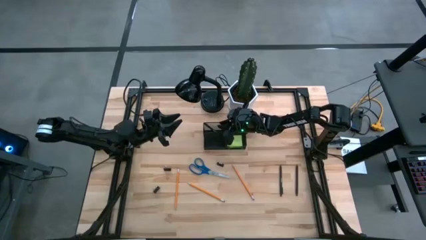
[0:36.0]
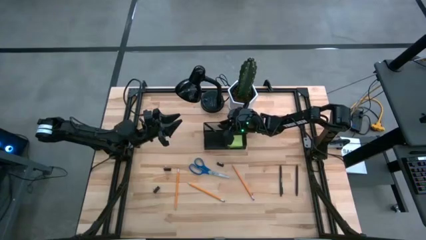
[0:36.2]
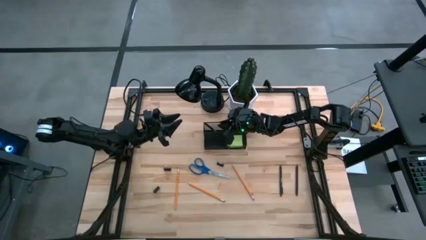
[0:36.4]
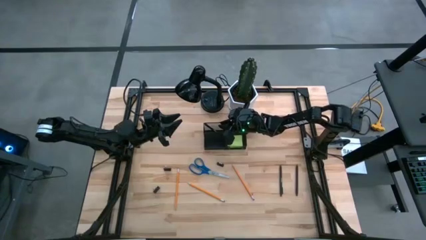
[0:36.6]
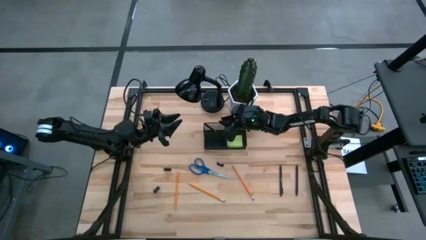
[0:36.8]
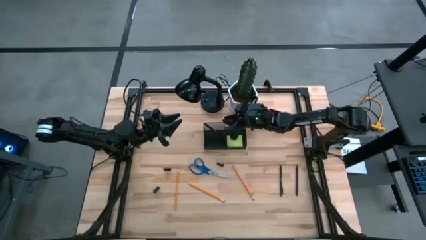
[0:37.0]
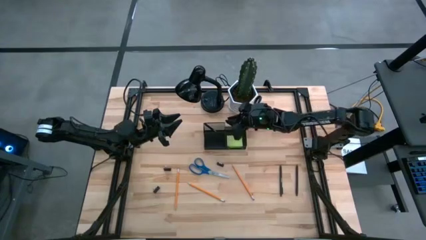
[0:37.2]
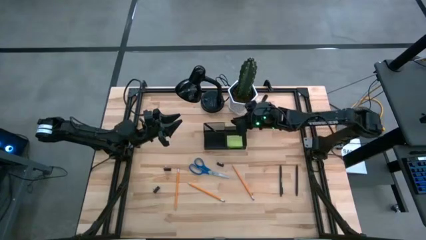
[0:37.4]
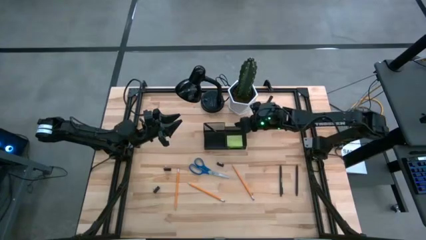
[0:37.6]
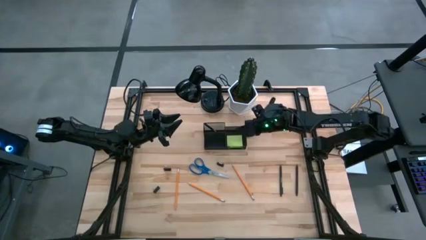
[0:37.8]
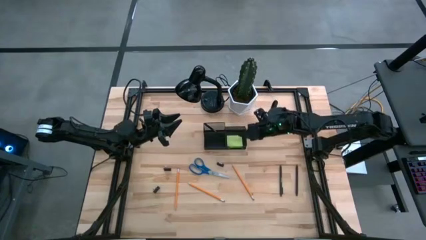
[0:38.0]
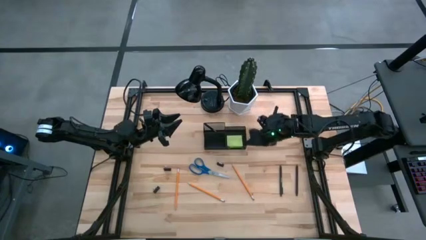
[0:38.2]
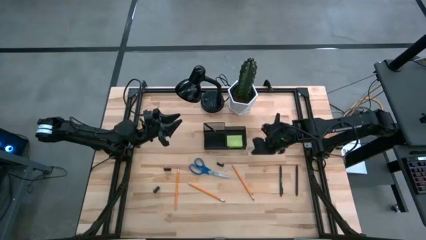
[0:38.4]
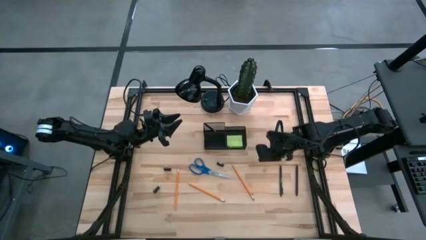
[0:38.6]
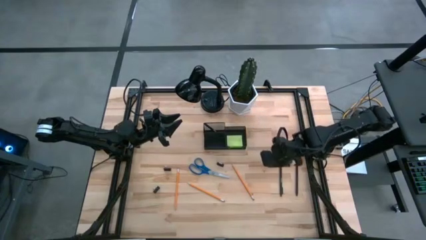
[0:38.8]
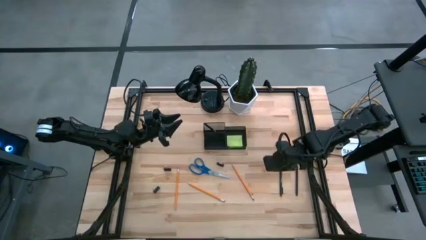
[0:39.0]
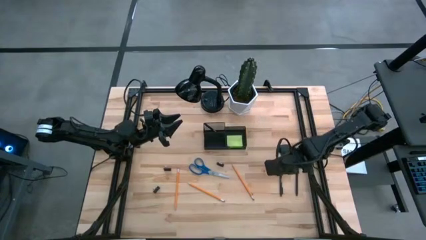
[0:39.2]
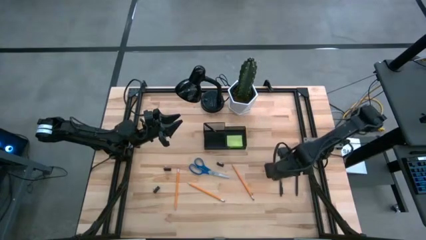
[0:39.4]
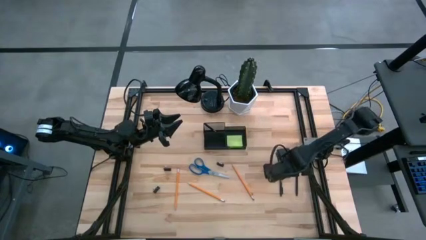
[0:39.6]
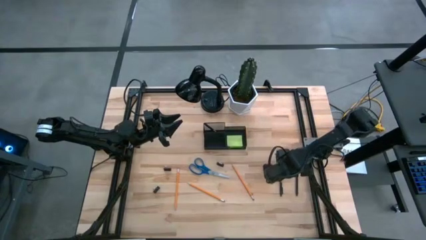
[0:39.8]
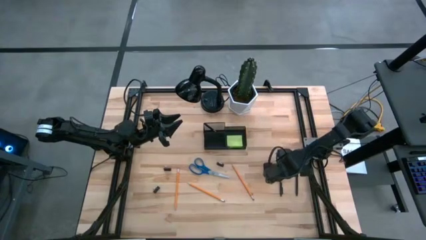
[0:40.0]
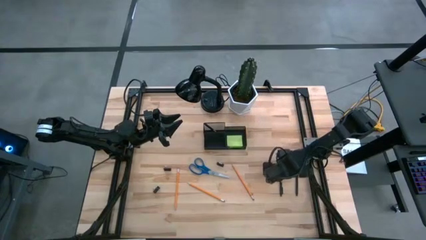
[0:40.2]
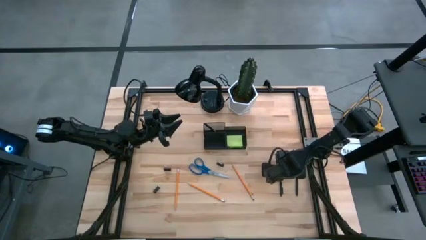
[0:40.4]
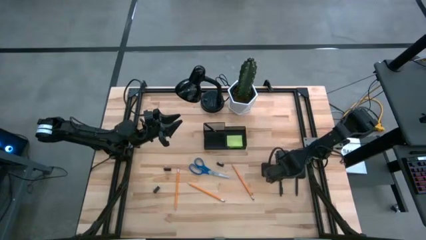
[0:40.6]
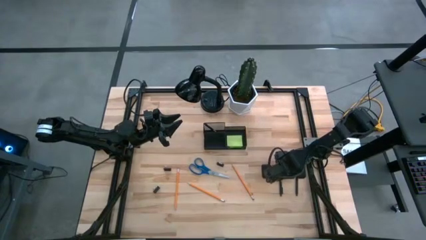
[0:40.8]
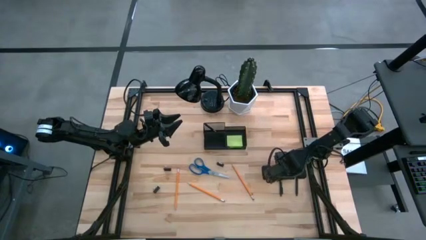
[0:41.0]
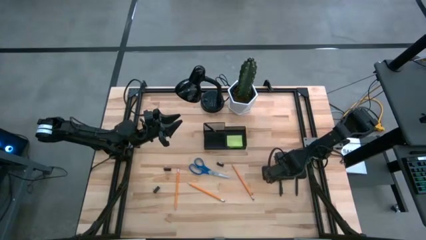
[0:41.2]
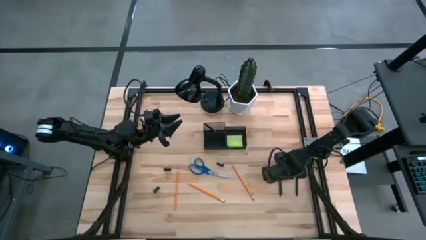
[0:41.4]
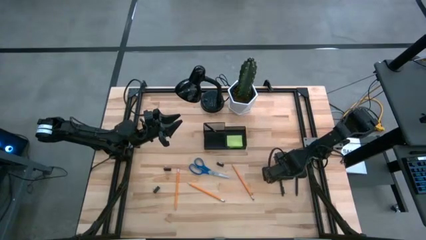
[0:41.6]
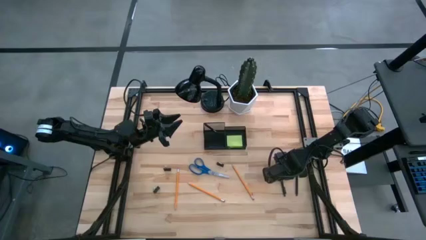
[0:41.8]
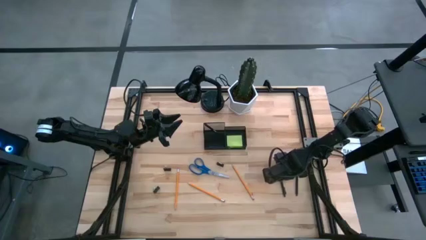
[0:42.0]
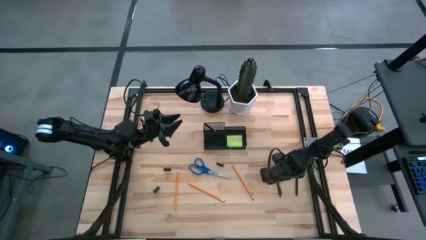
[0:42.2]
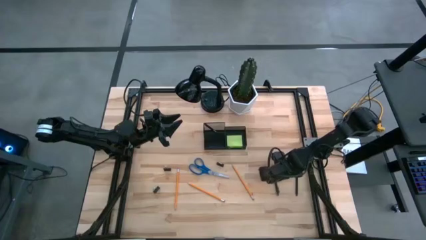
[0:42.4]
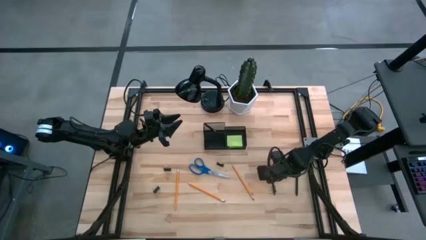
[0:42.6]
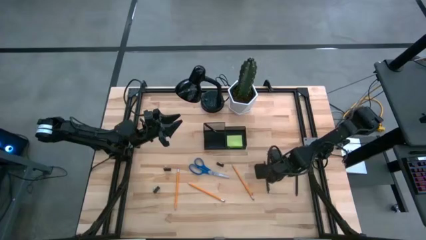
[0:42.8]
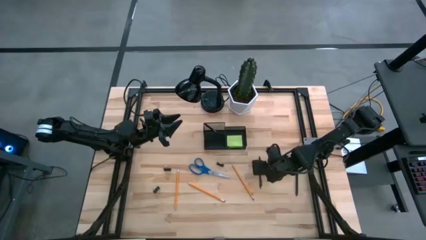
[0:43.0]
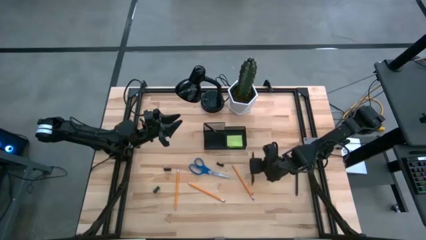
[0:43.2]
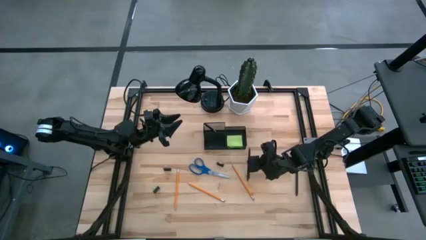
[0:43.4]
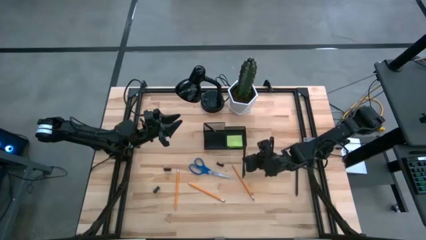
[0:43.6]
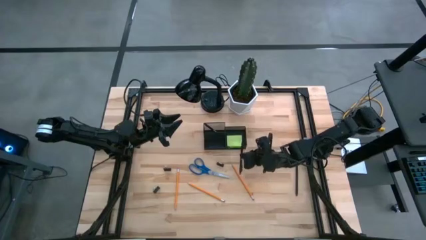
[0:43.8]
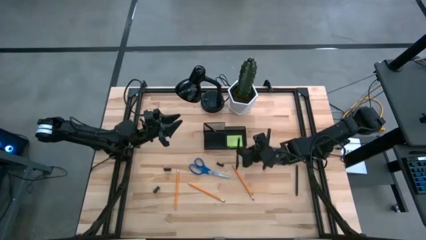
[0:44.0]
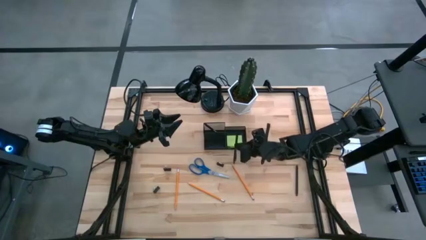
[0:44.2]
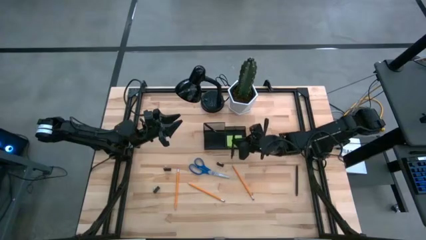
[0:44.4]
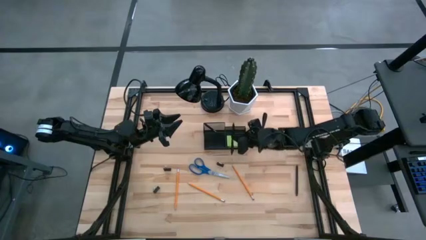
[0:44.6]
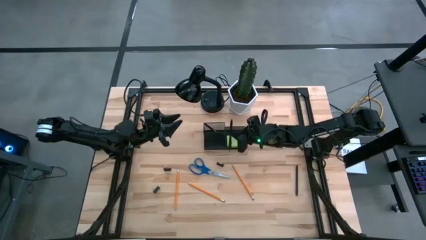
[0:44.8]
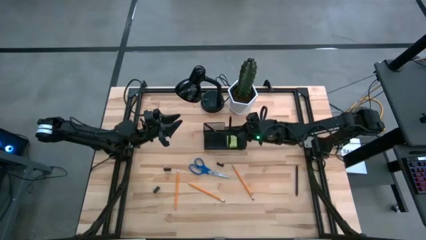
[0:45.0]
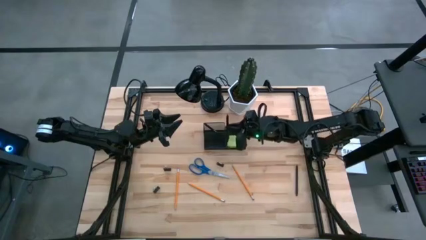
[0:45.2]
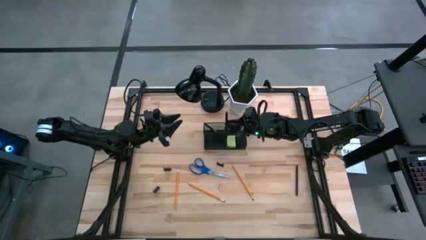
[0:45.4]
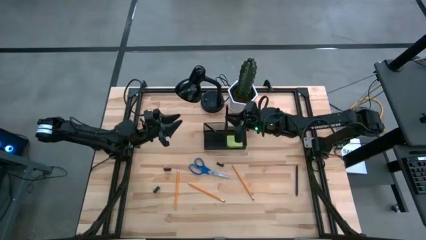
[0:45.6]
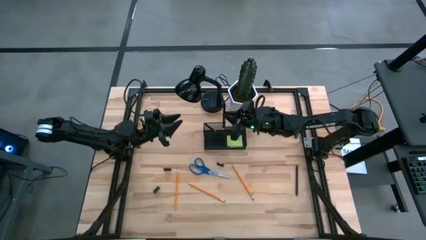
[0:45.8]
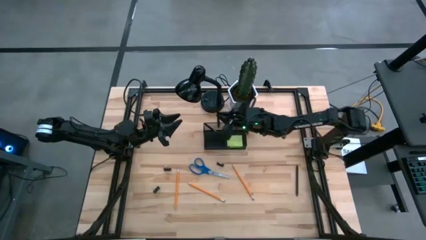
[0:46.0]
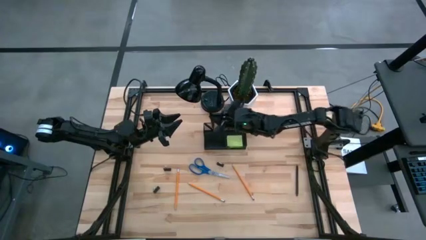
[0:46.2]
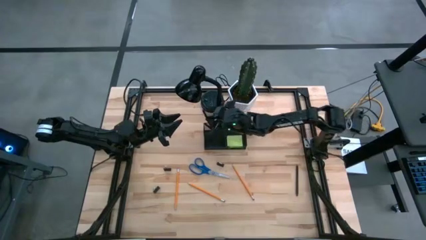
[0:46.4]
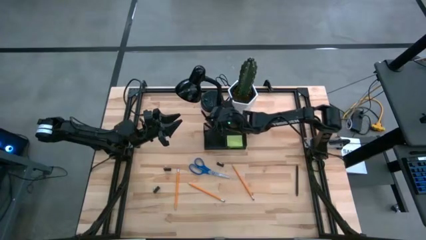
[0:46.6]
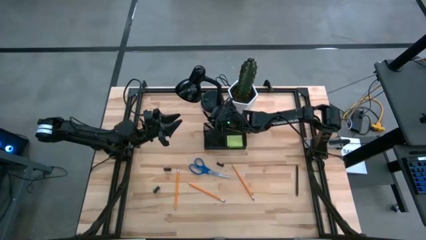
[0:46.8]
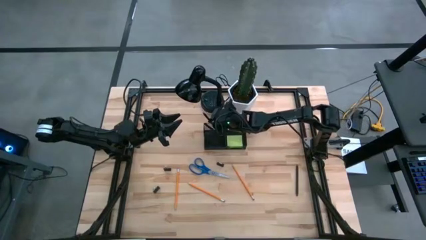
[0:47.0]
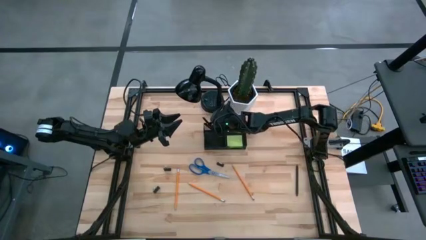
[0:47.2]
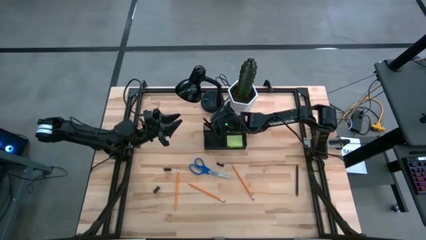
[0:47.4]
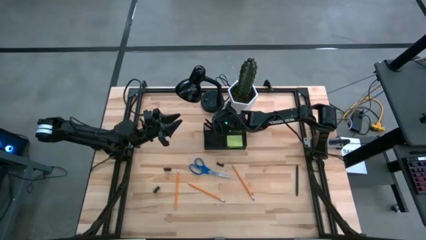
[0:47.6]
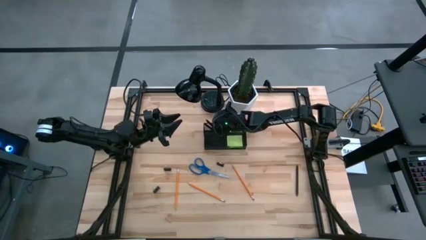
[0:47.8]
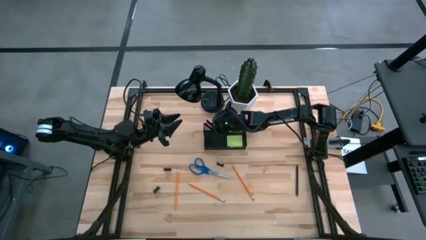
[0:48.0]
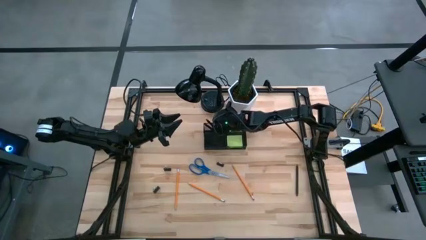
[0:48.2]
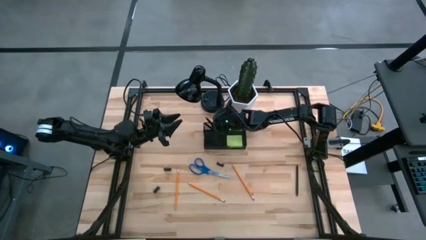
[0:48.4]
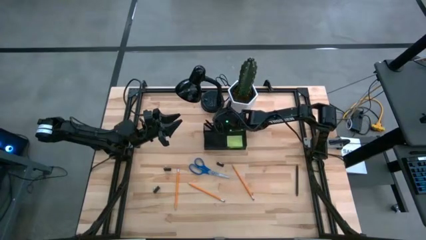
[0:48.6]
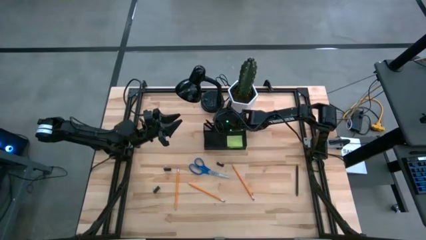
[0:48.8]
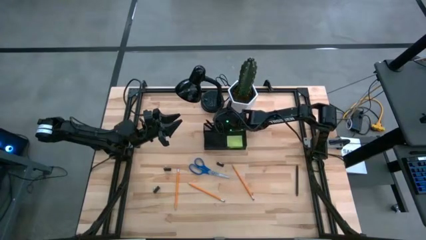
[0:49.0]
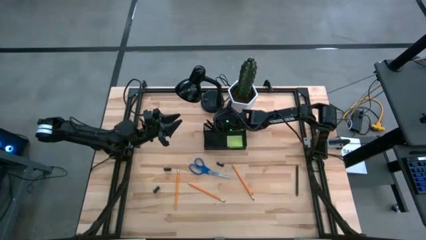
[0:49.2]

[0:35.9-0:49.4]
Task: Pick and place office supplies into organizer
Put the left black pen into the mesh desk organizer
